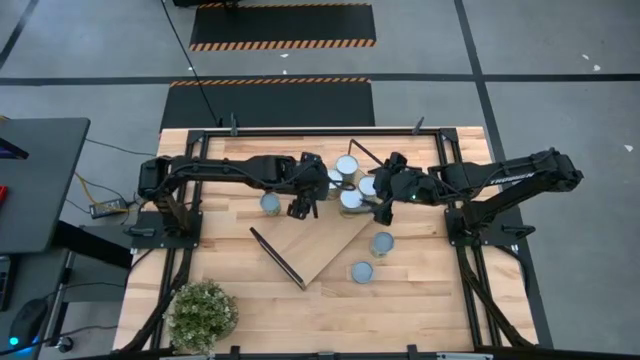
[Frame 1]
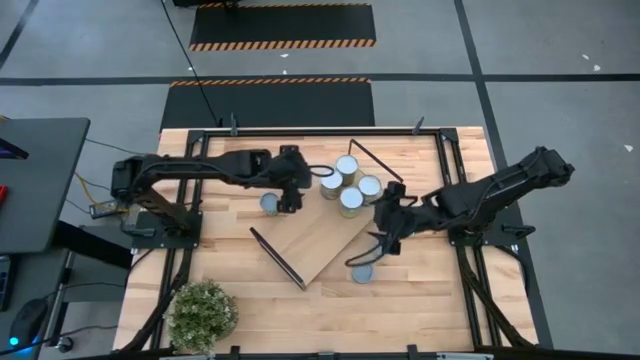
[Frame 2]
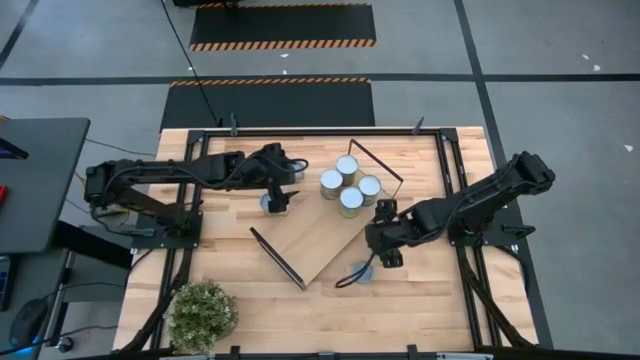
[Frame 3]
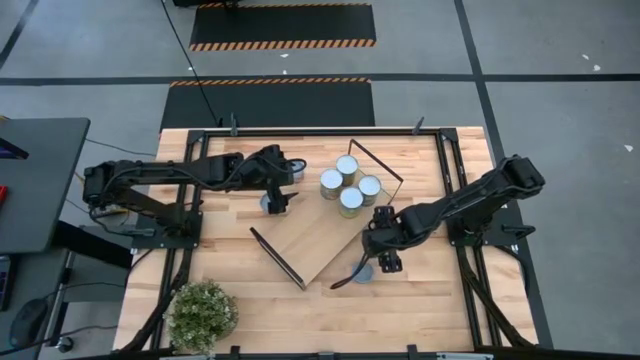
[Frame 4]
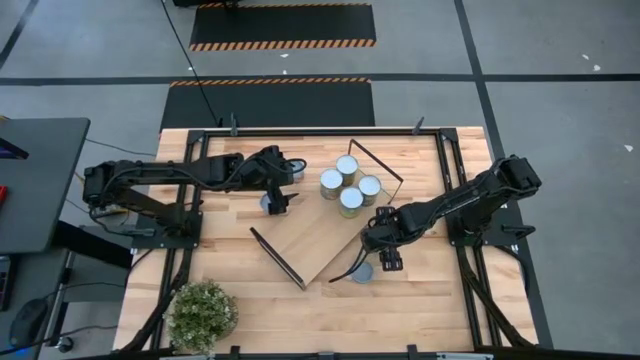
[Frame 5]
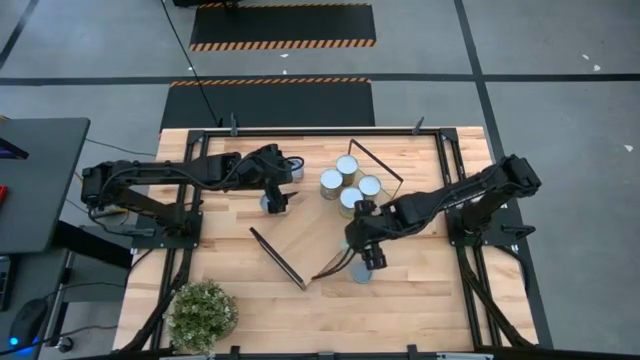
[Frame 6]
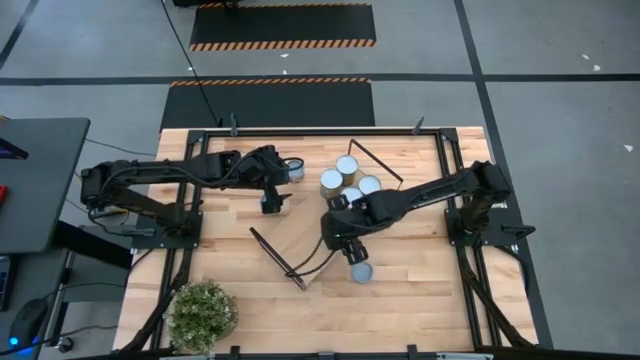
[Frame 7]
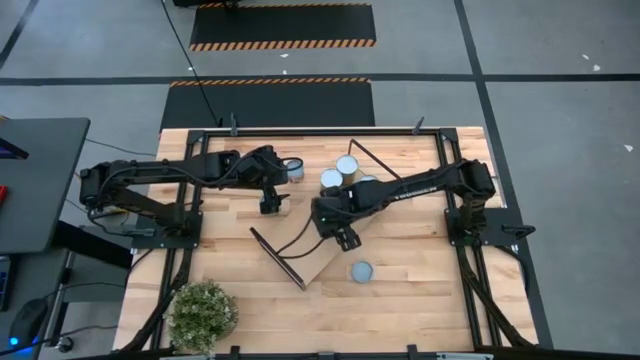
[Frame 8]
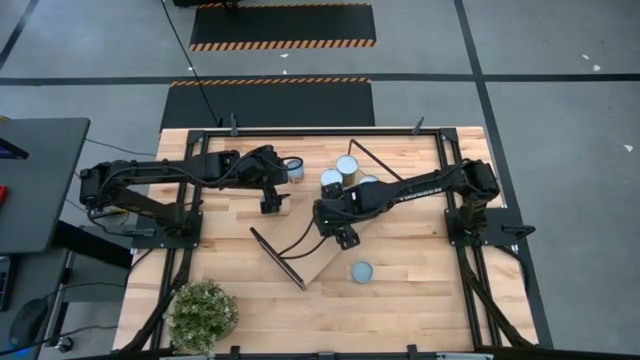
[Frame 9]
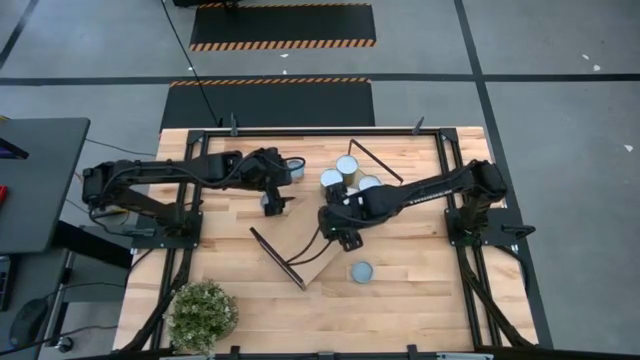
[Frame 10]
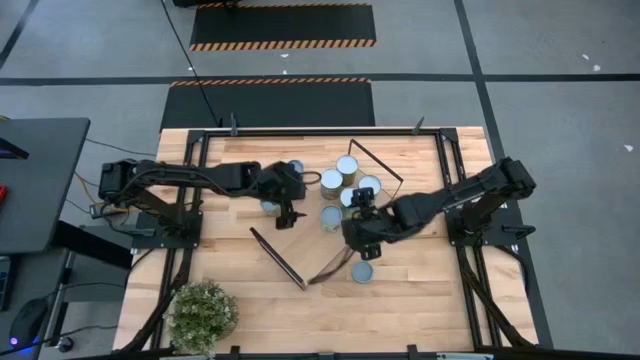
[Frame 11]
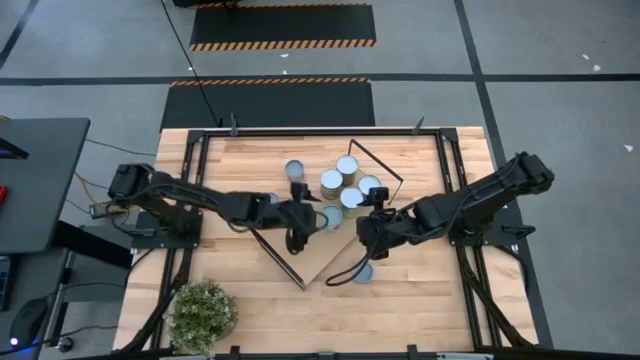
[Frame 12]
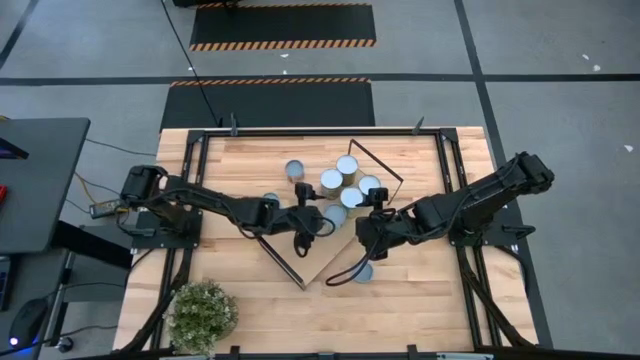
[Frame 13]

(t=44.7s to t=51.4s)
Task: Pick and place cans onto a shelf
Put the white fruit can on the shelf

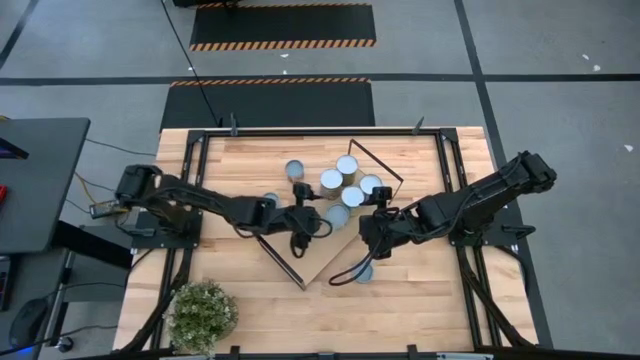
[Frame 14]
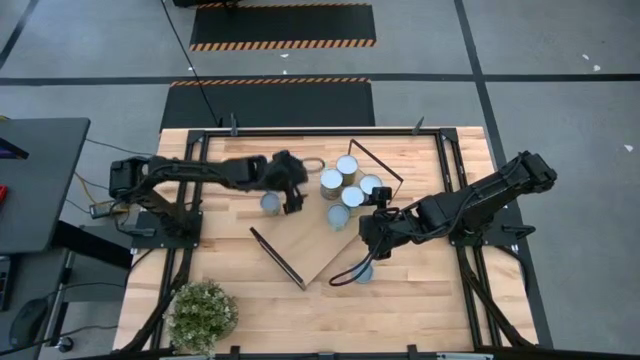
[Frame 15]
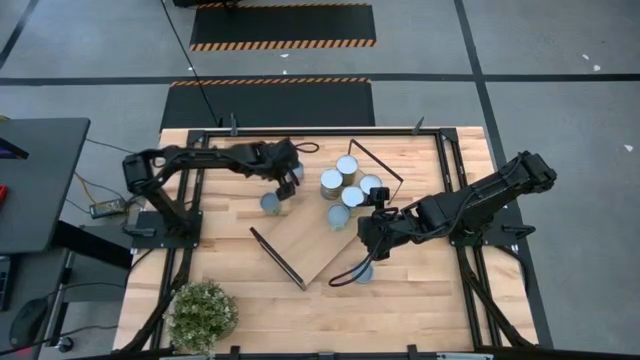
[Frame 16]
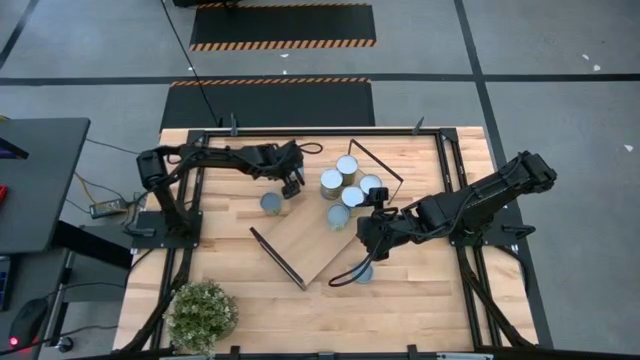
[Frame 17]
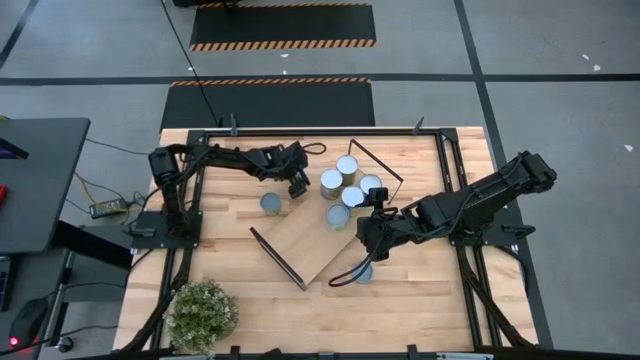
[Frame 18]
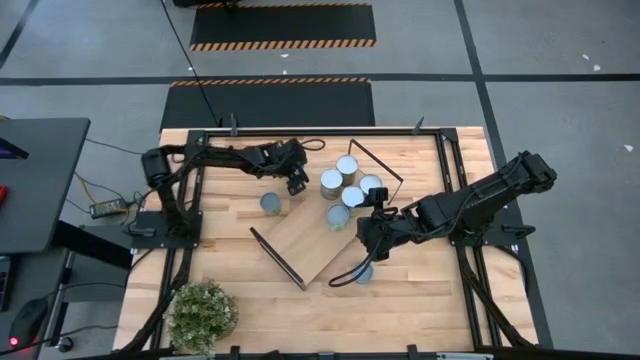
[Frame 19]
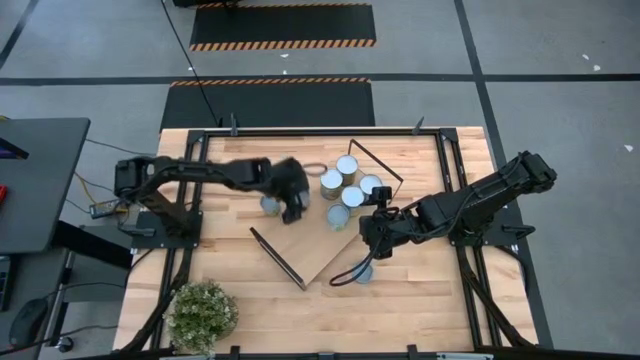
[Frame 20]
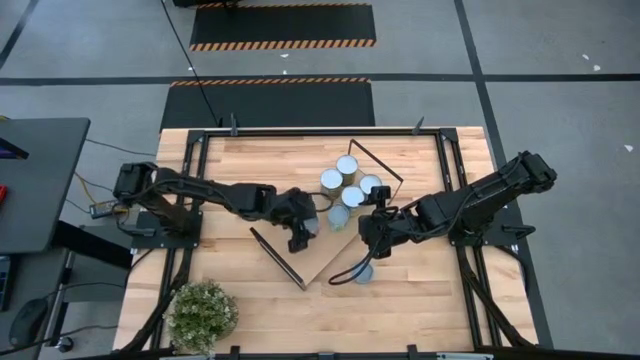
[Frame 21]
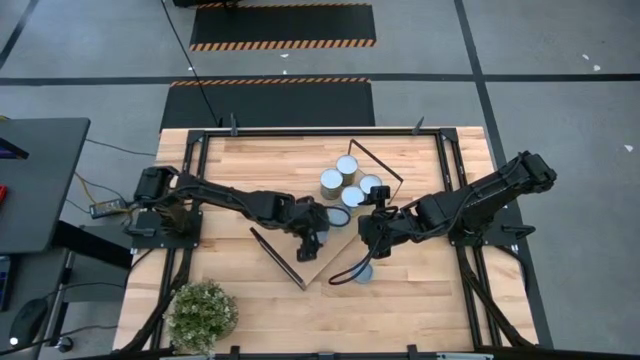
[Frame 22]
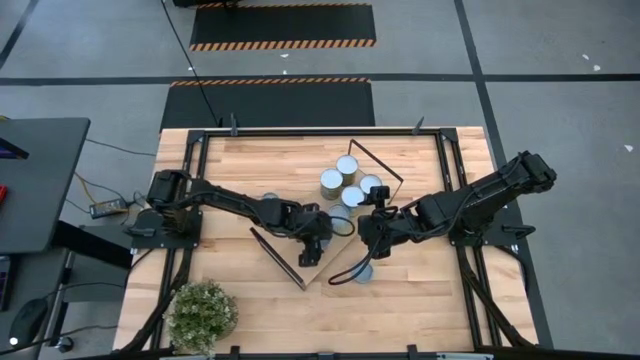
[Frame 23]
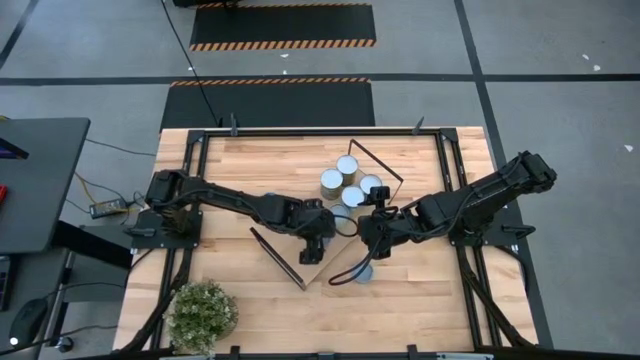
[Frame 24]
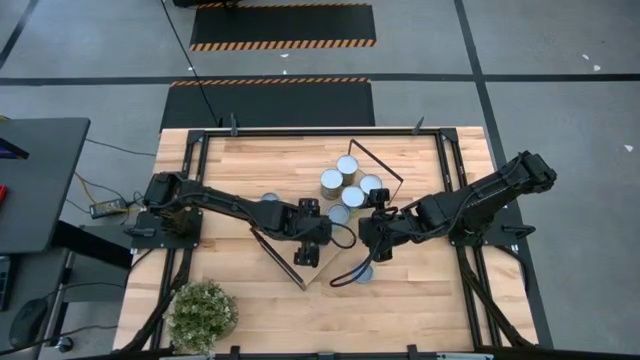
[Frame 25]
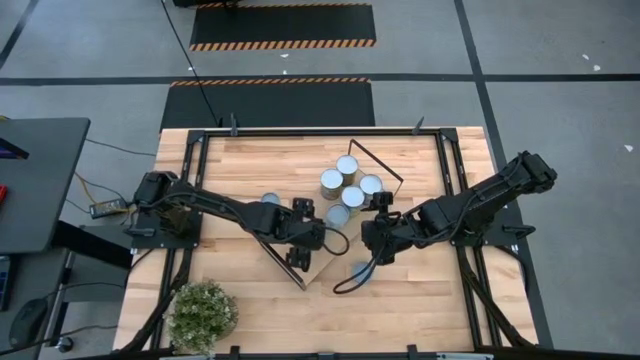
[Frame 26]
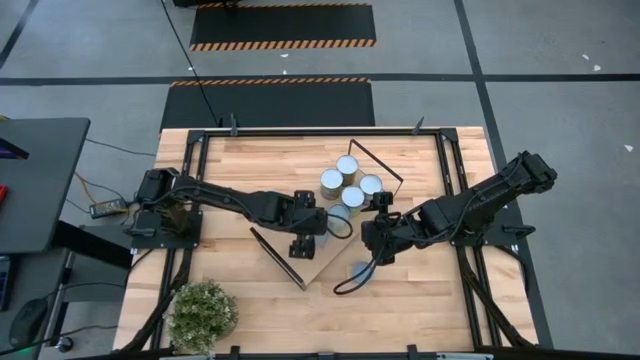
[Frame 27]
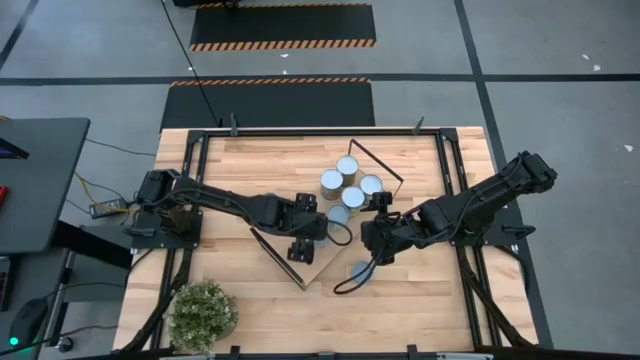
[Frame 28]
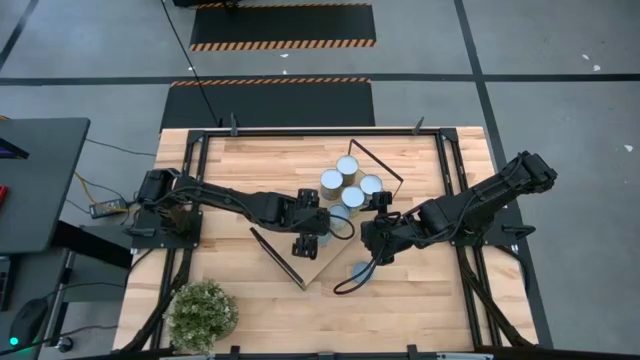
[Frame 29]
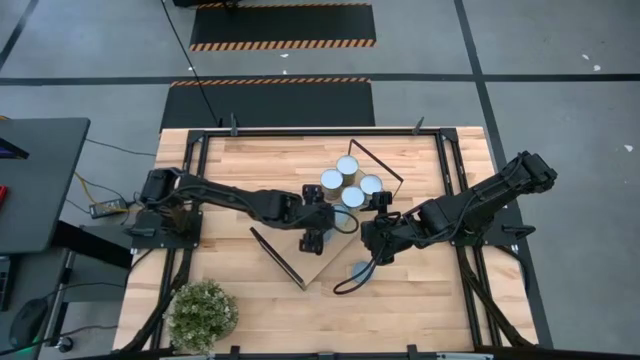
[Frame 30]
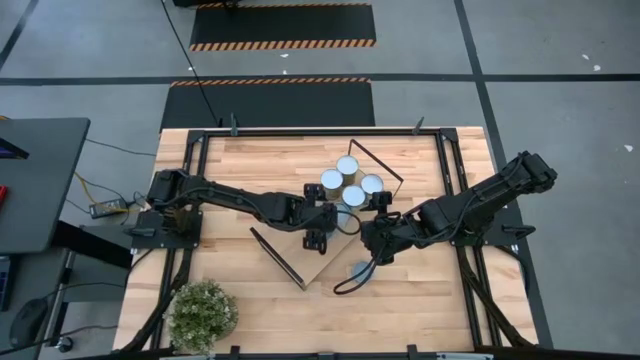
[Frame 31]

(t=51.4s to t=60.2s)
Put the red fruit can on the shelf

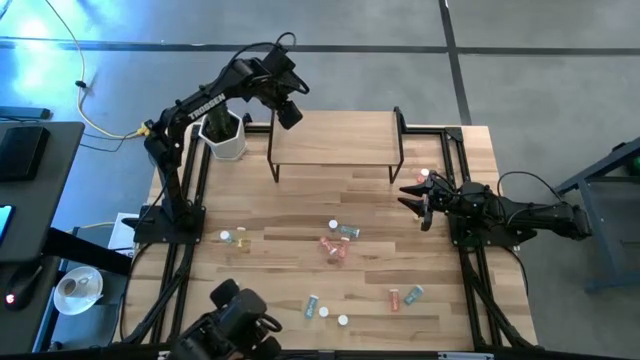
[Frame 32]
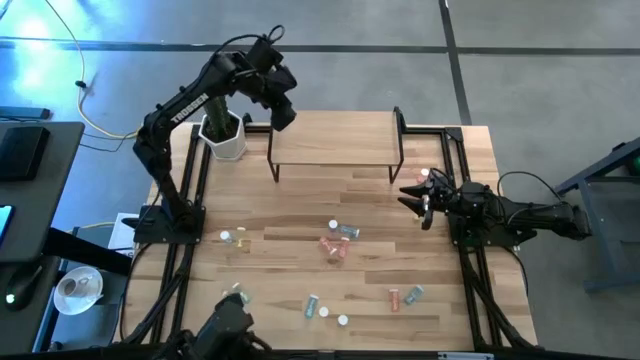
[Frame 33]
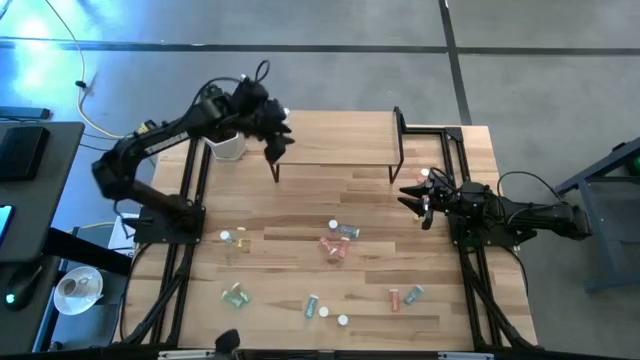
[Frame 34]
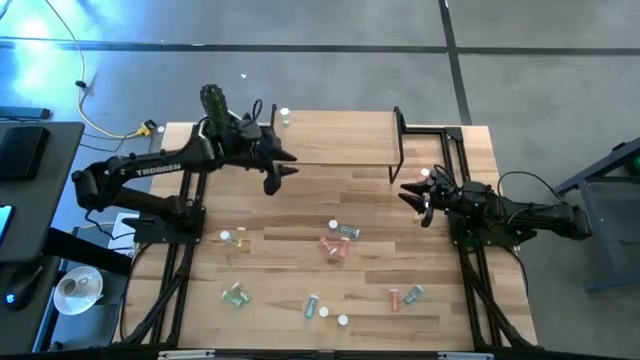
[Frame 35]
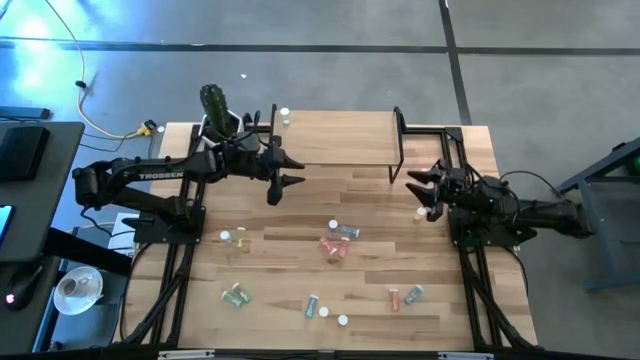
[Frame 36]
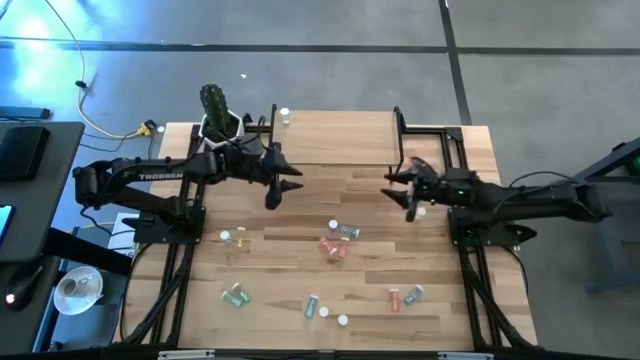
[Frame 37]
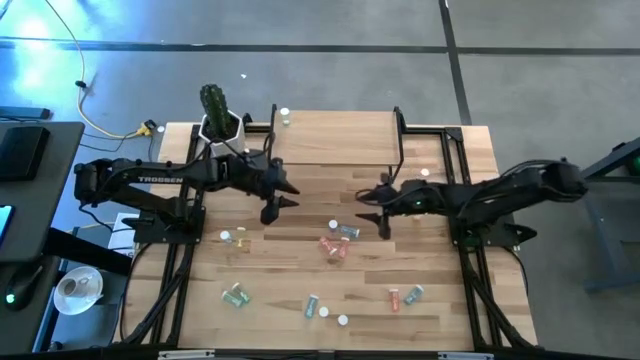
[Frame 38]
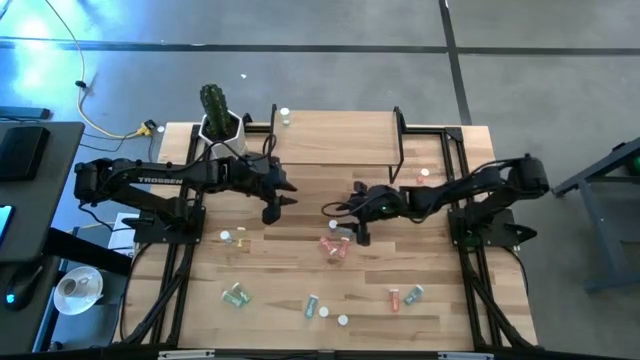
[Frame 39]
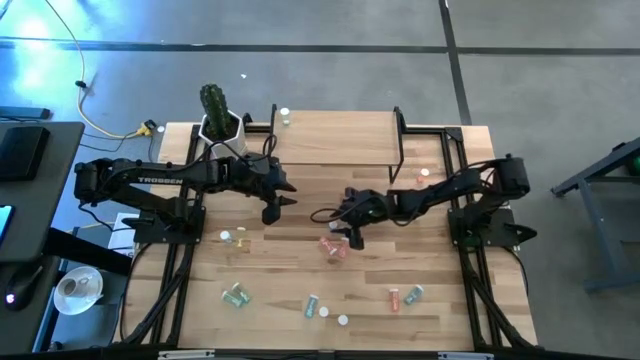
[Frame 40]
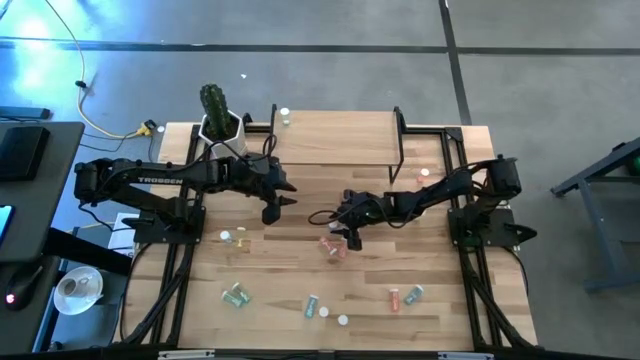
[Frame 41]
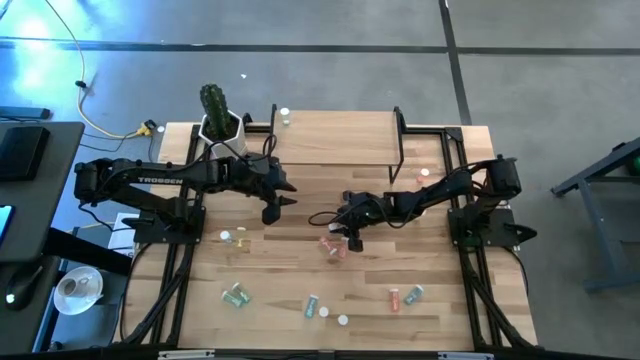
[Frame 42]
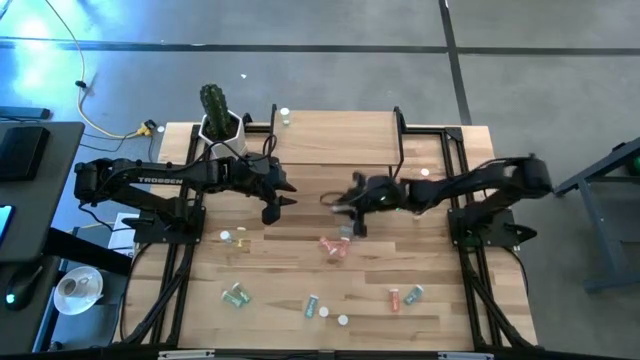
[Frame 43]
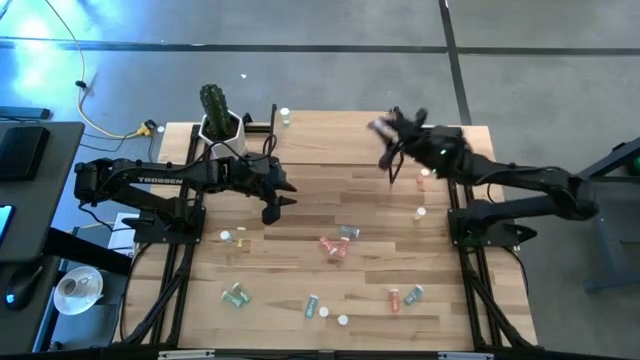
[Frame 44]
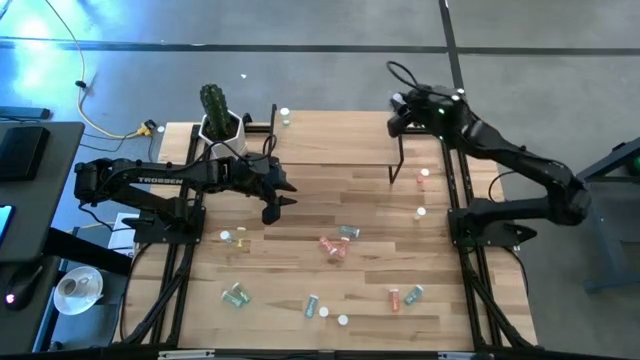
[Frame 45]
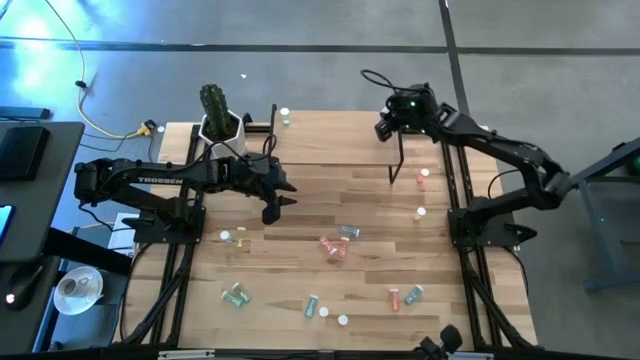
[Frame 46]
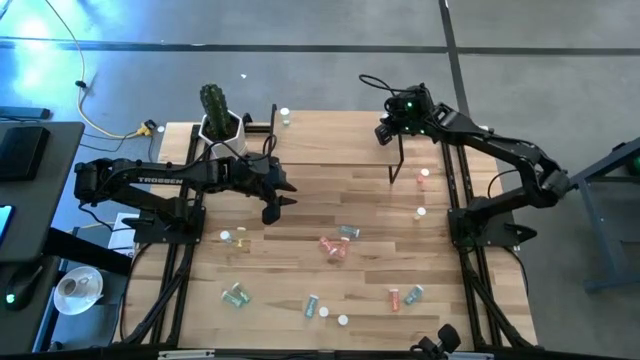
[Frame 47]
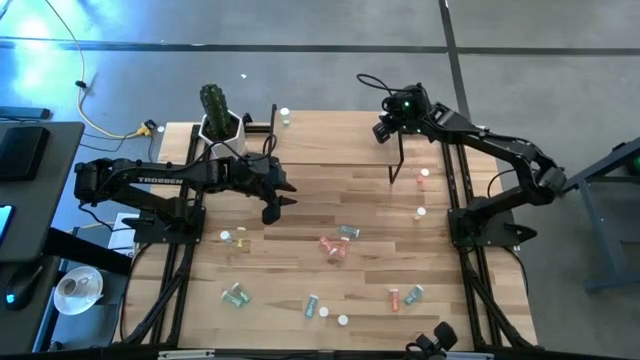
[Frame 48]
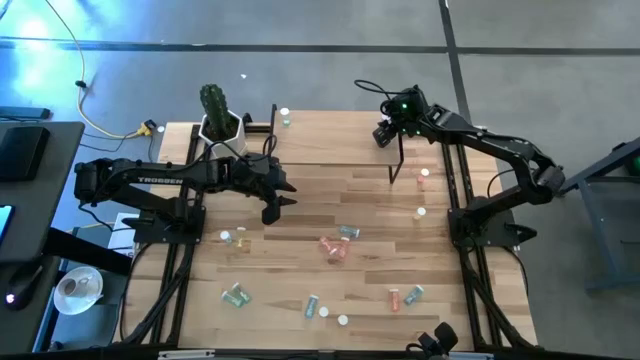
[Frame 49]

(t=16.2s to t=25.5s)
Task: Pick and place medicine bottles onto shelf by color
Put the blue pill bottle on the shelf
